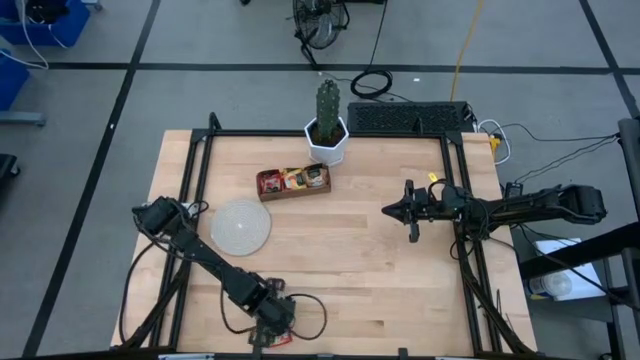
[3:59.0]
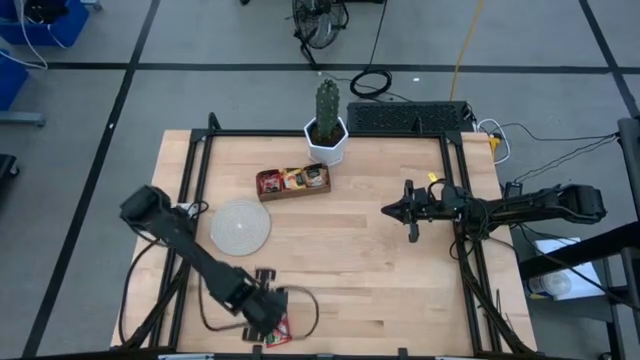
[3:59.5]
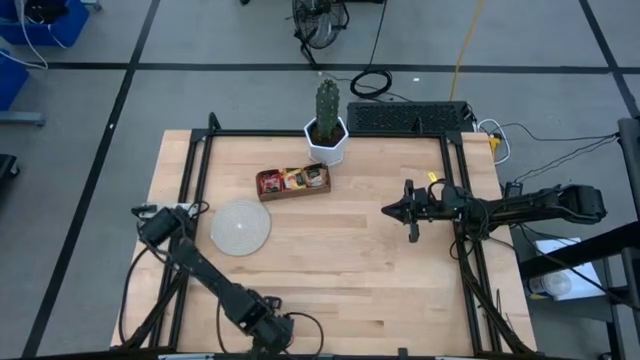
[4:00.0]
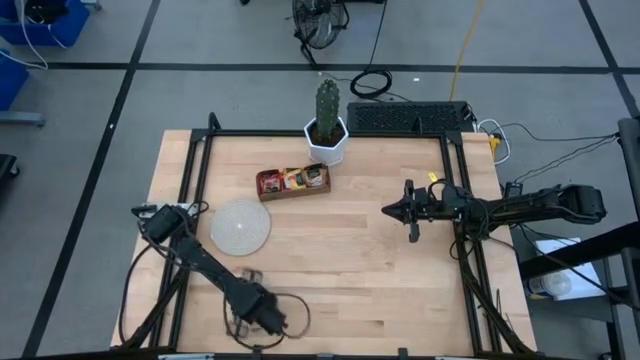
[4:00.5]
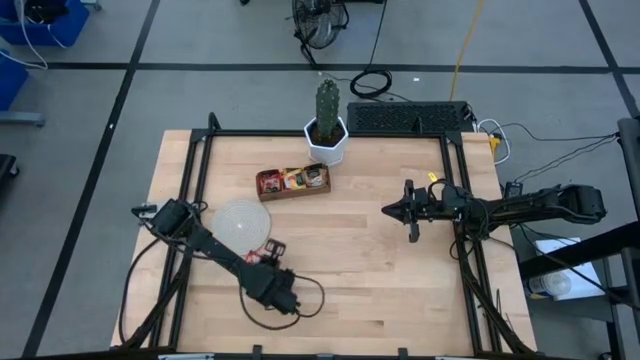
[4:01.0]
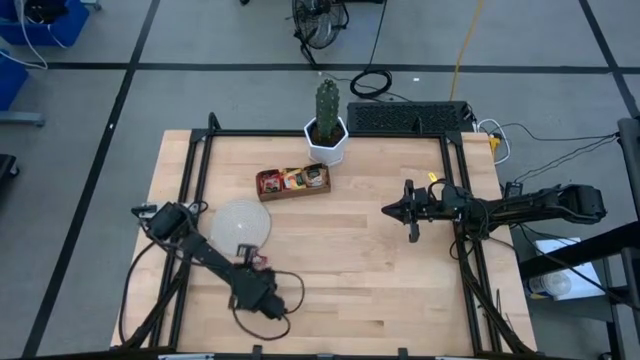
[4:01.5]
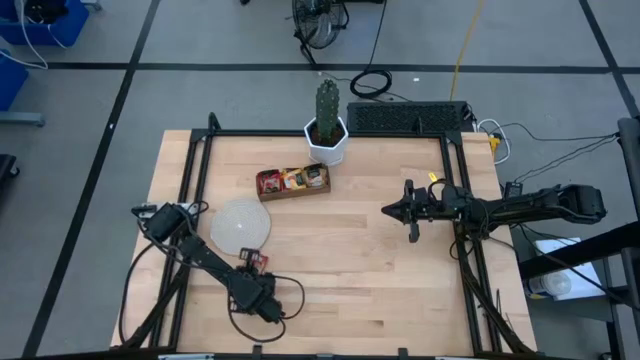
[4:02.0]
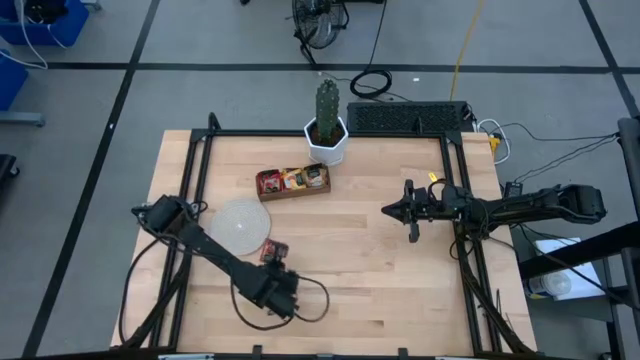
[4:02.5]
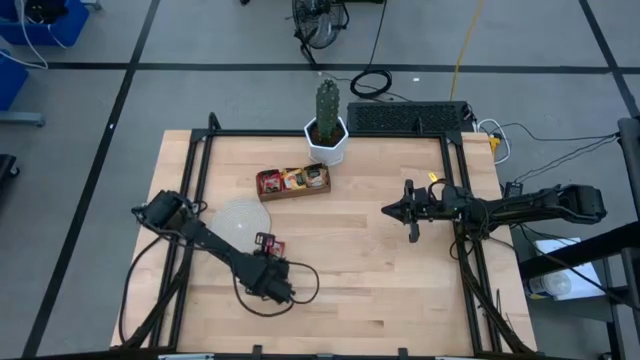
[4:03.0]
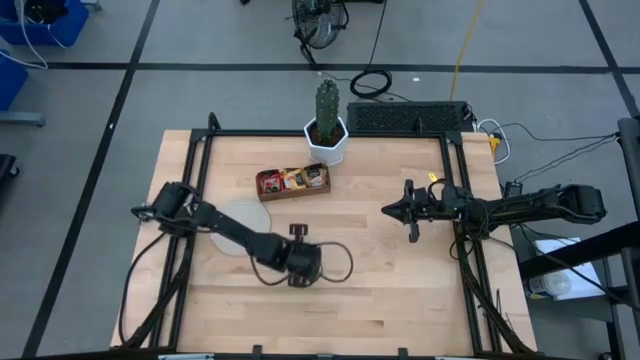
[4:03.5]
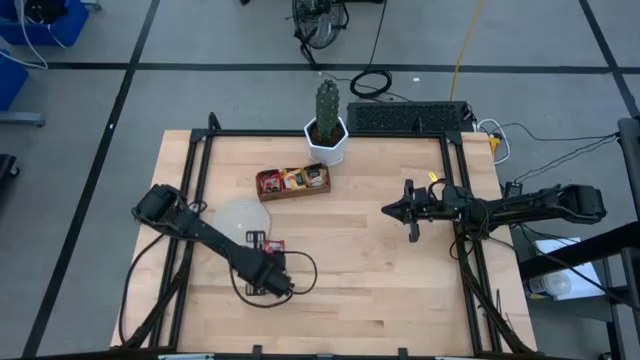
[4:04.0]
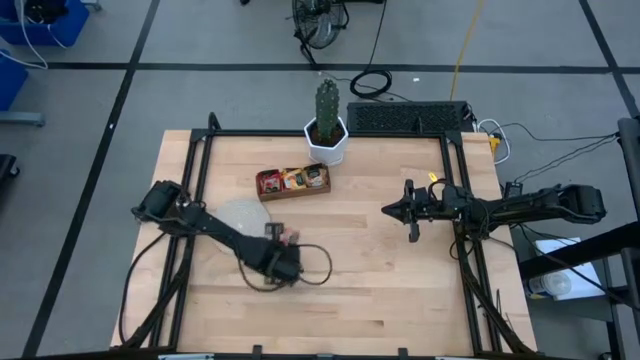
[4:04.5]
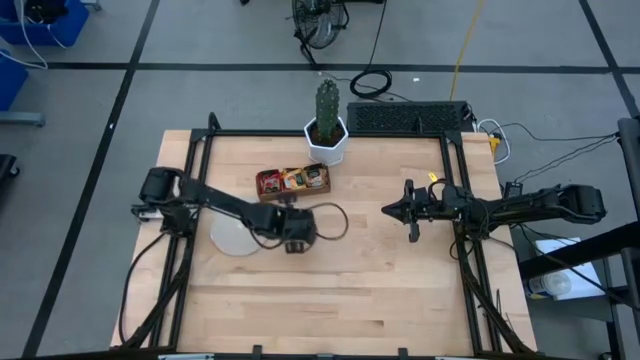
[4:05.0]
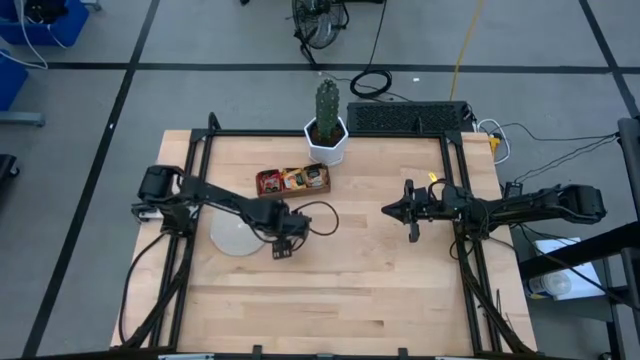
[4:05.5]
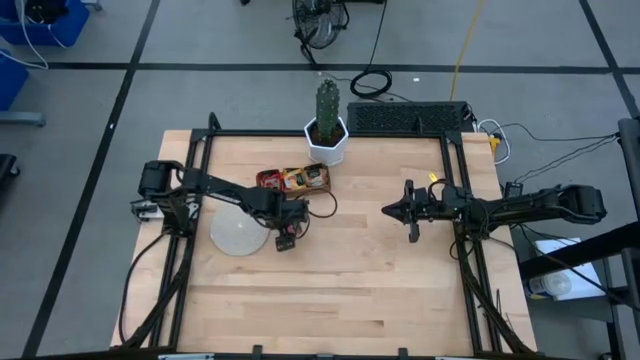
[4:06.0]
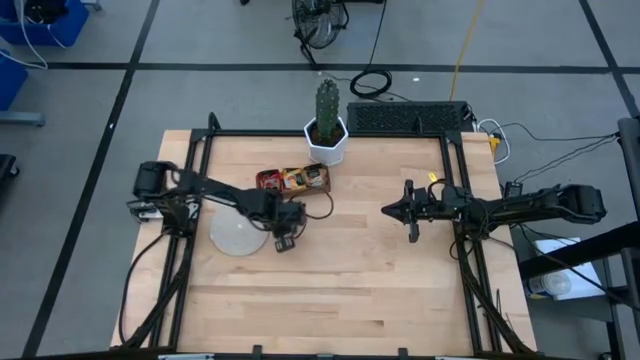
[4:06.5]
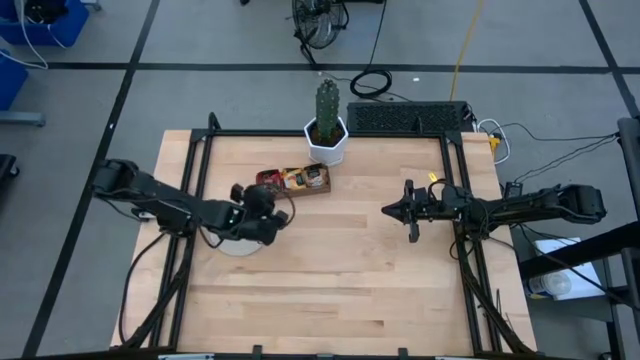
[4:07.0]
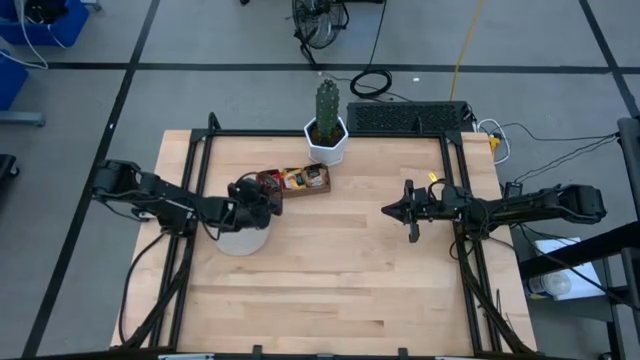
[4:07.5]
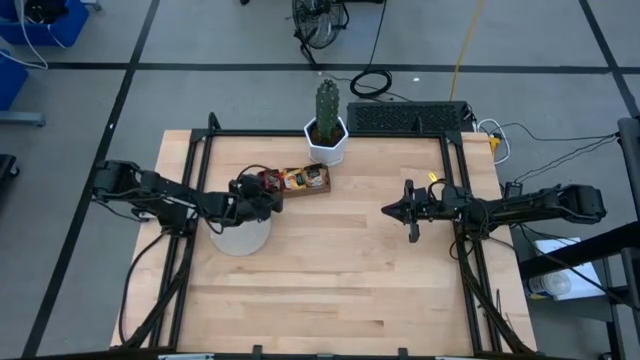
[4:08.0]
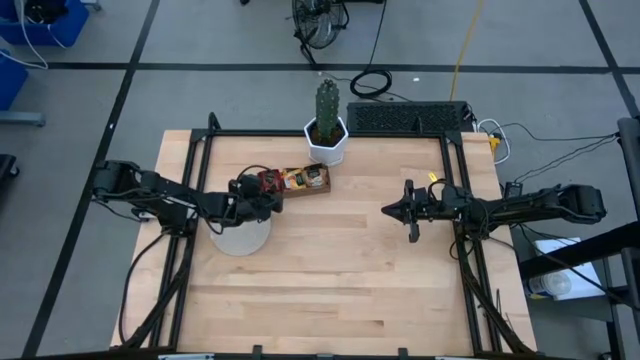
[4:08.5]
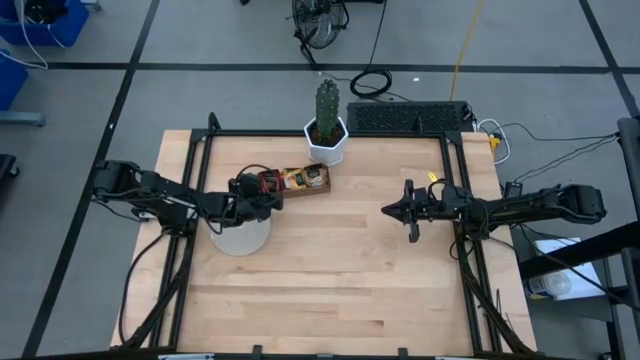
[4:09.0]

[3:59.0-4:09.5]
Task: Pick & Place Tea
Put the red tea bag into the left section of the wooden organizer

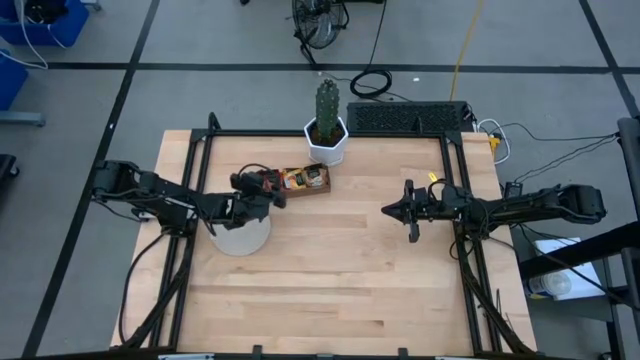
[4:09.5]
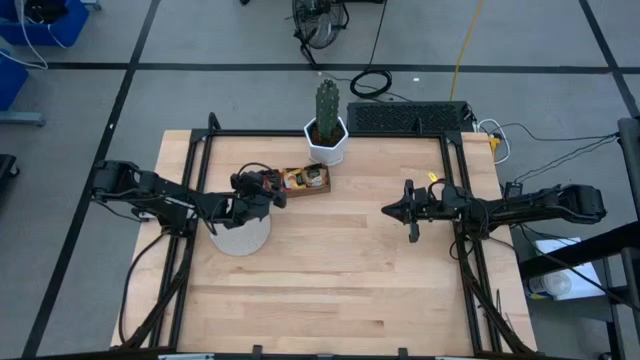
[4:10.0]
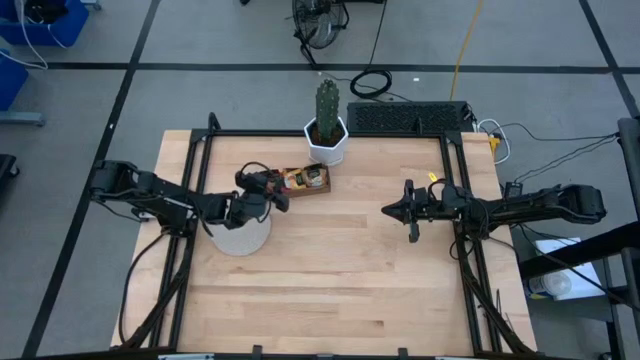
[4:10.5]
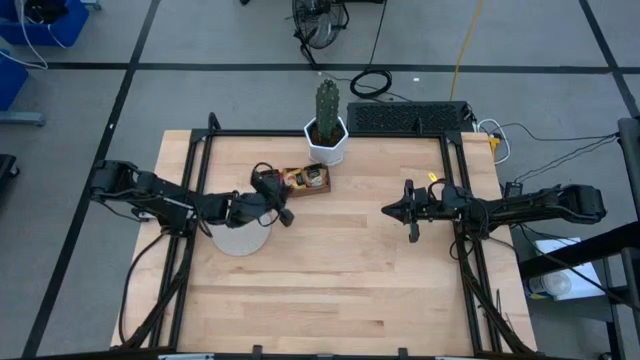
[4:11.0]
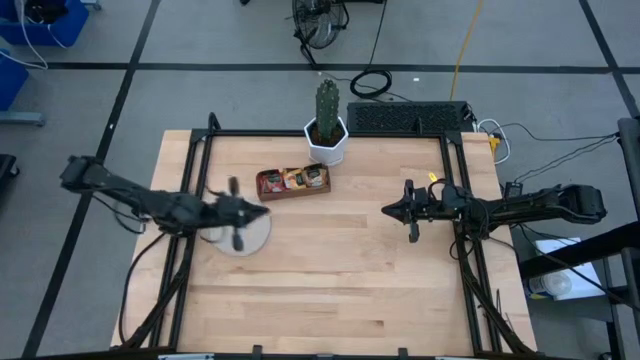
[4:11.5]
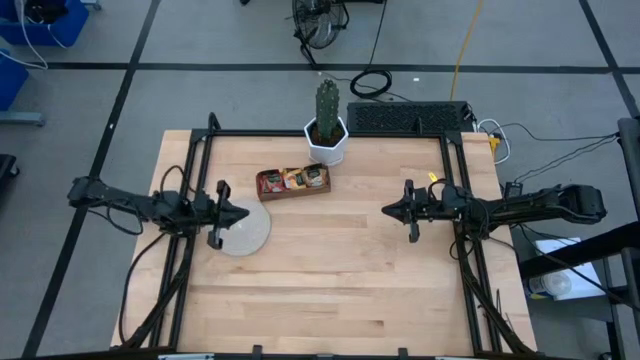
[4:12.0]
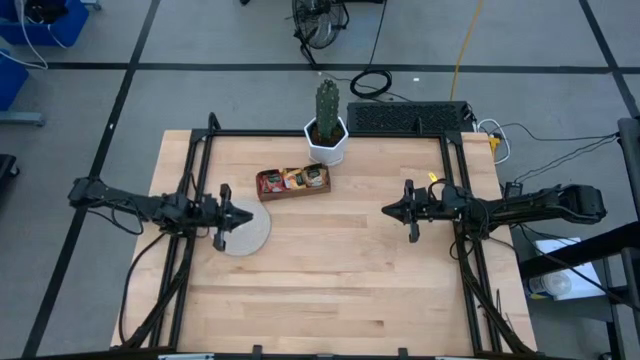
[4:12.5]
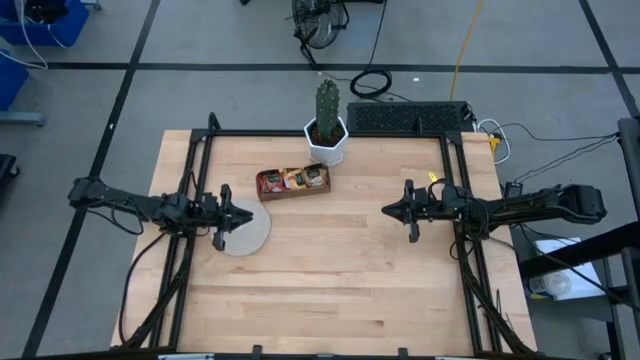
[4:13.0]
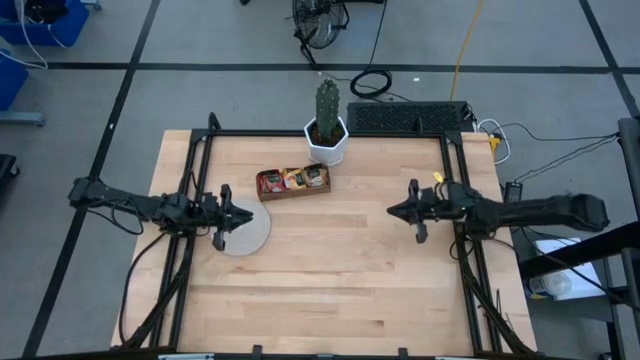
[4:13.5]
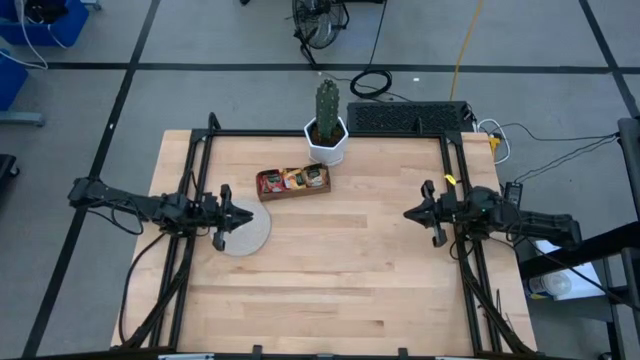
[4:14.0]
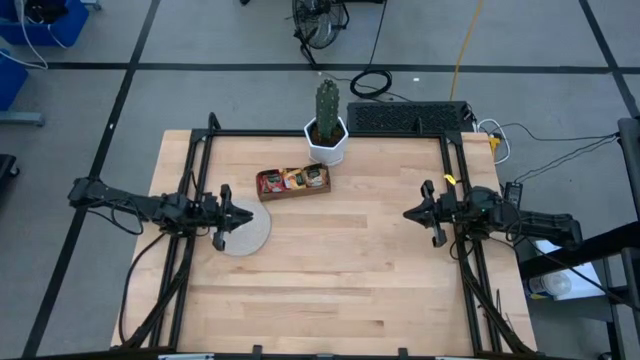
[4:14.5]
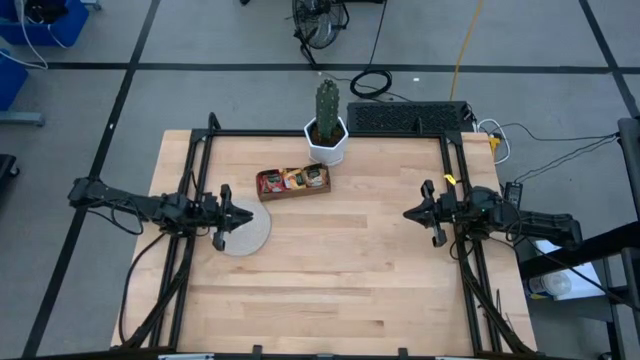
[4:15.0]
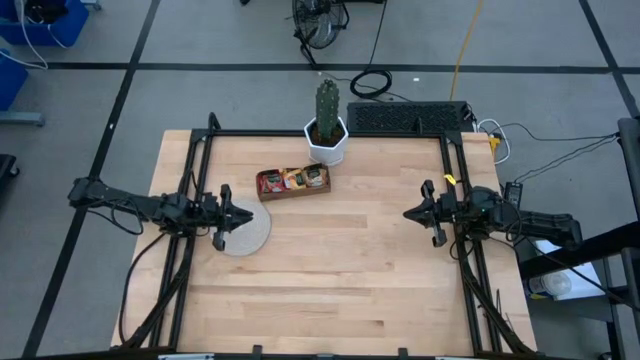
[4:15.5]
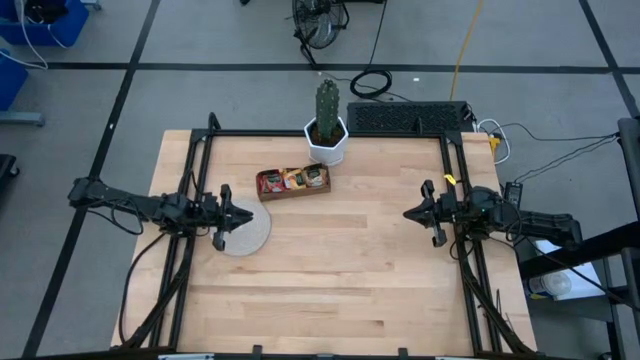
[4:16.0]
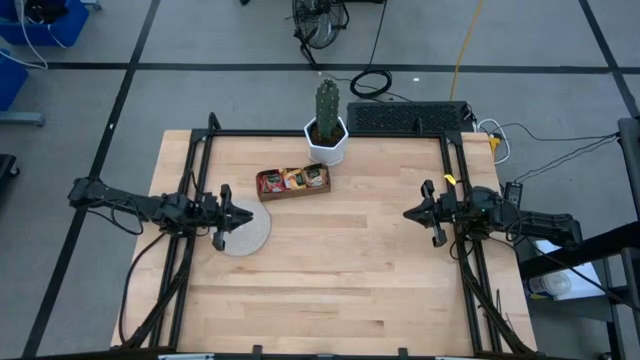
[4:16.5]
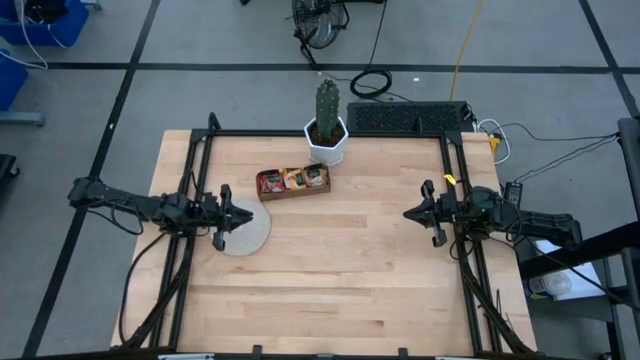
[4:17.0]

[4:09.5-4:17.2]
Return to Home Position

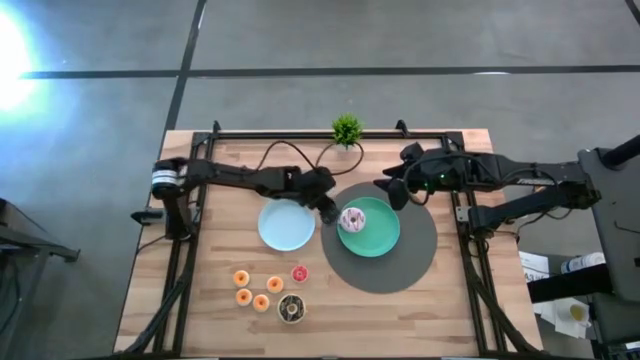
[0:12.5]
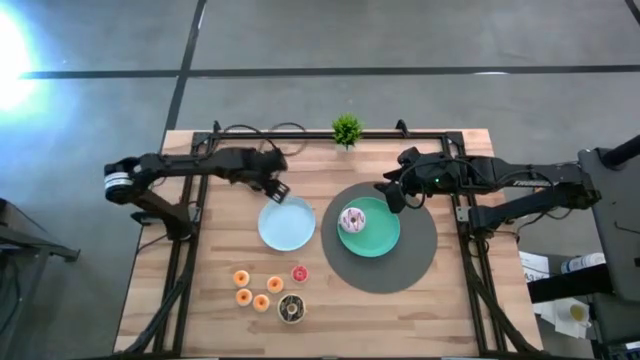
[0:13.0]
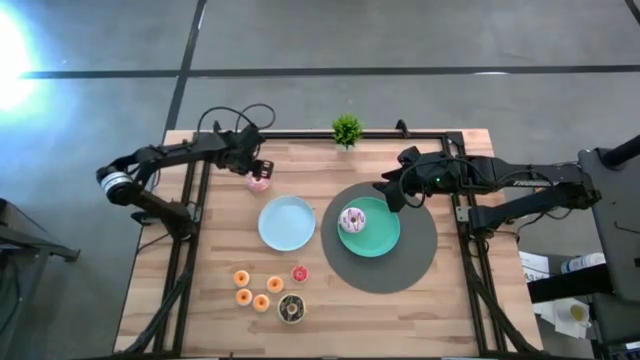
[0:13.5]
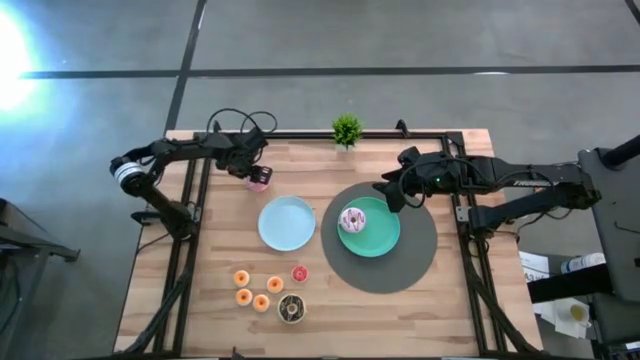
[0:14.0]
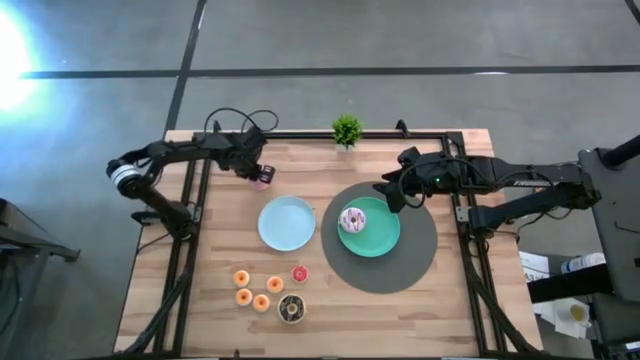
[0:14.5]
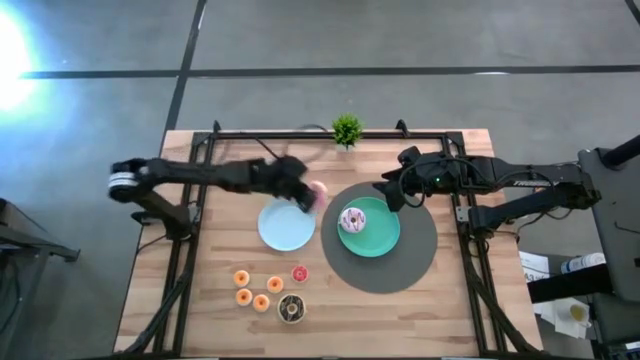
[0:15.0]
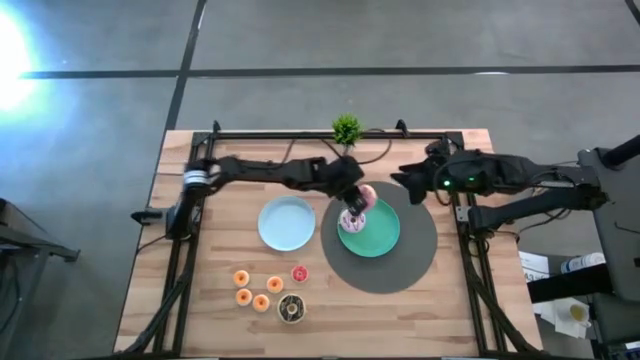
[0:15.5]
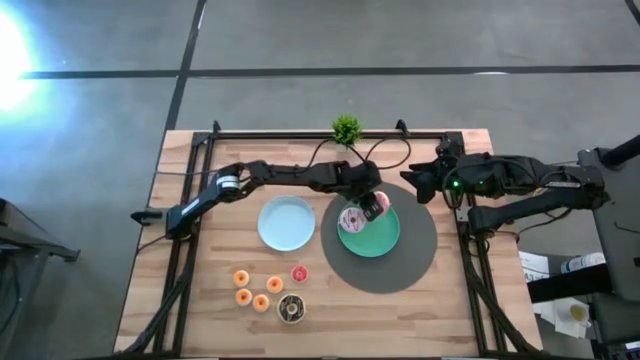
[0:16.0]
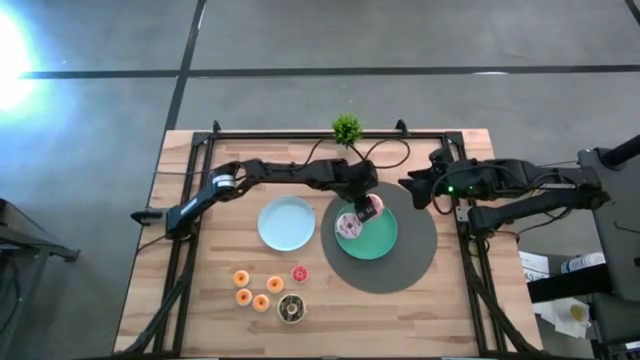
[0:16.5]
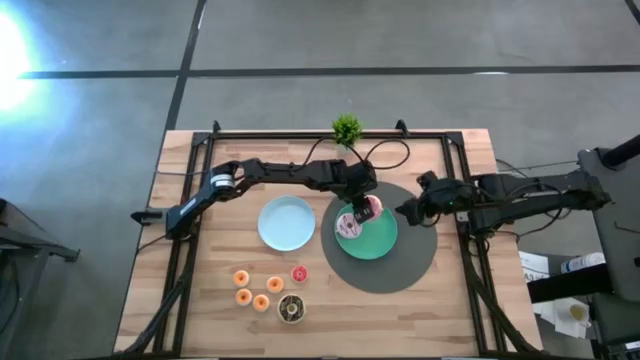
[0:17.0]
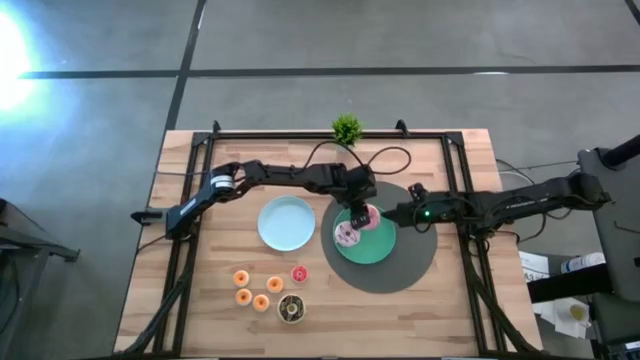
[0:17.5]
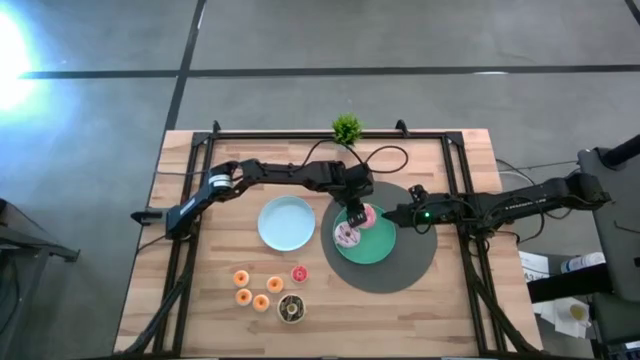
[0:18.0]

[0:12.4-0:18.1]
Task: Pick & Place donuts
Put the large pink donut on the light green plate
